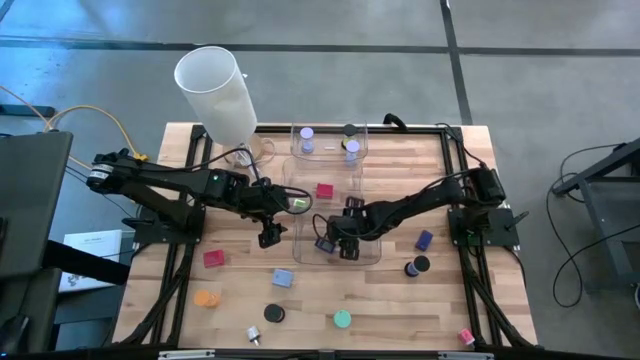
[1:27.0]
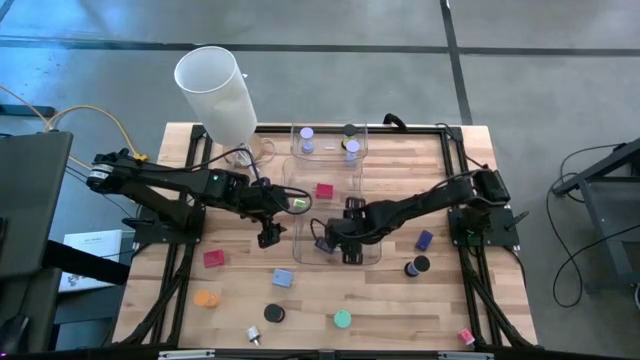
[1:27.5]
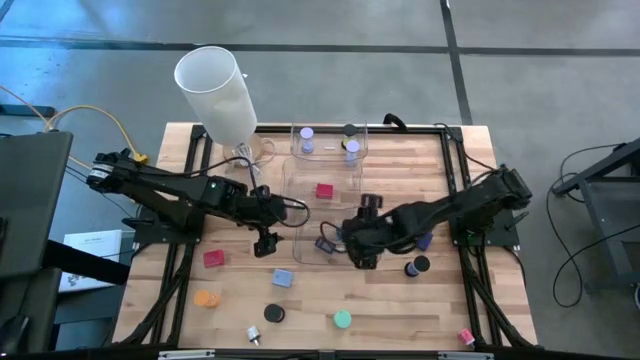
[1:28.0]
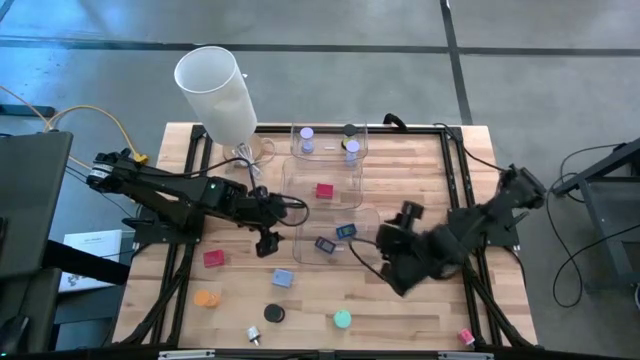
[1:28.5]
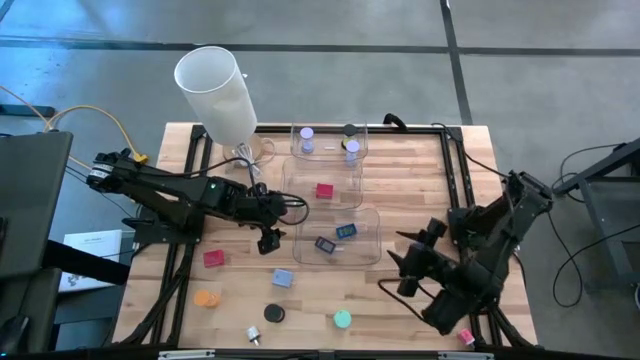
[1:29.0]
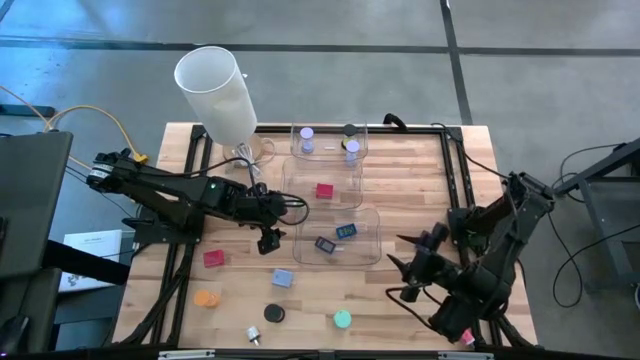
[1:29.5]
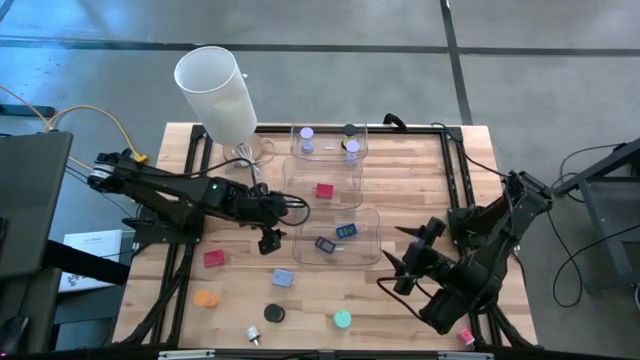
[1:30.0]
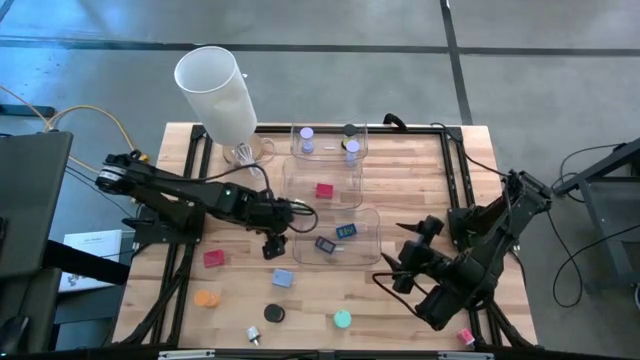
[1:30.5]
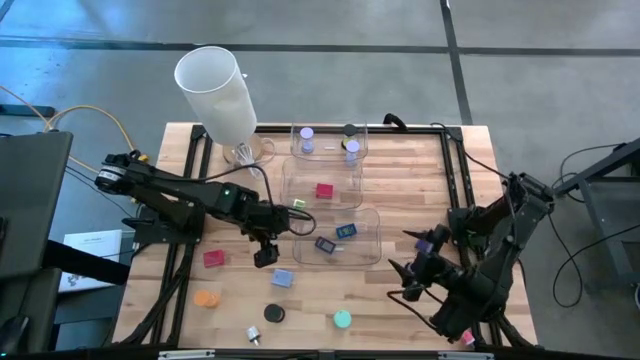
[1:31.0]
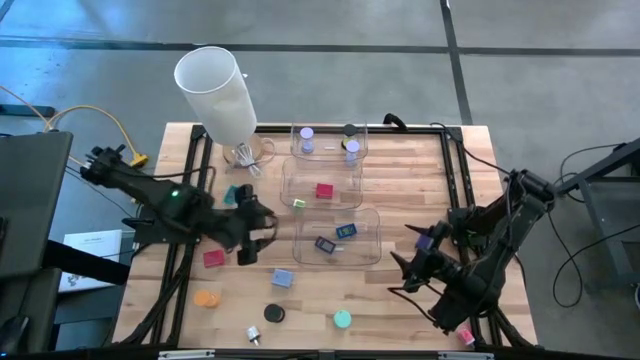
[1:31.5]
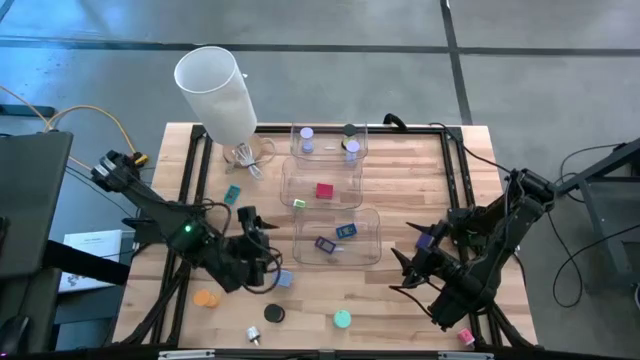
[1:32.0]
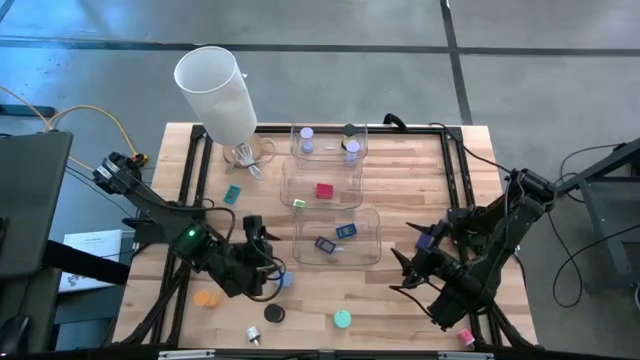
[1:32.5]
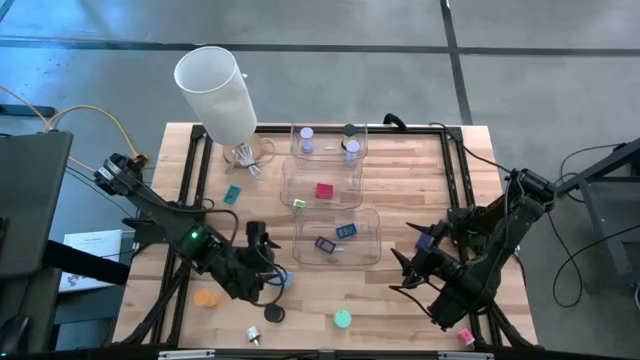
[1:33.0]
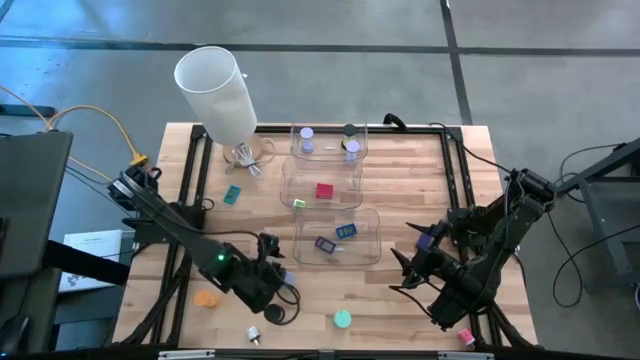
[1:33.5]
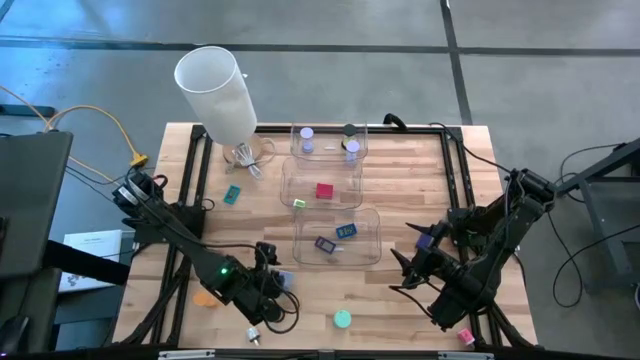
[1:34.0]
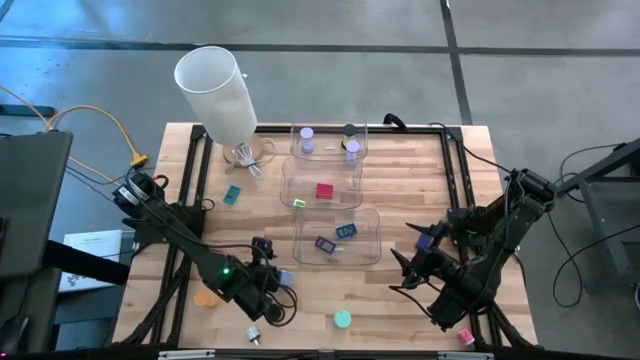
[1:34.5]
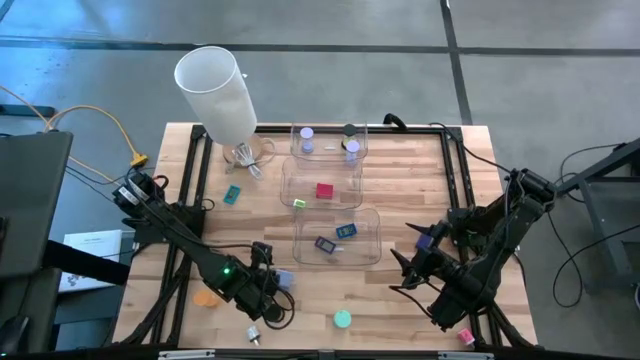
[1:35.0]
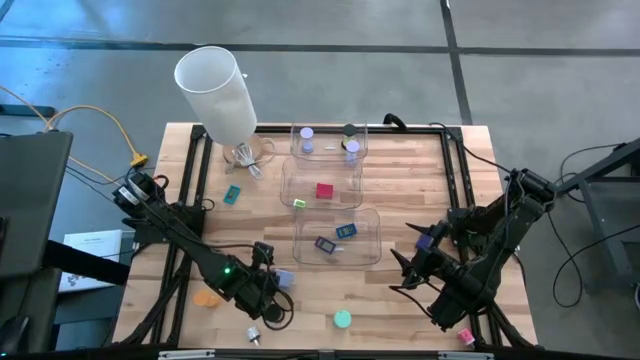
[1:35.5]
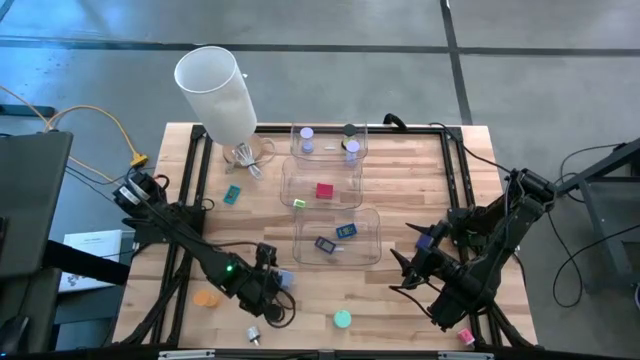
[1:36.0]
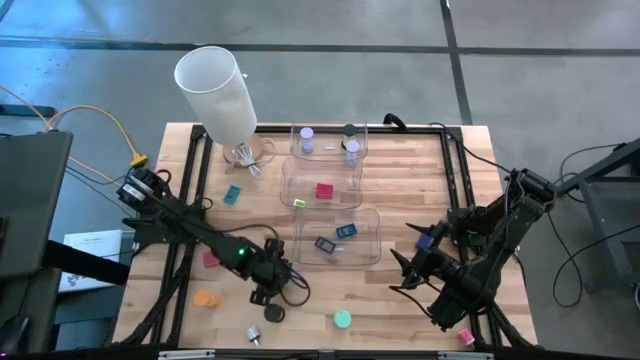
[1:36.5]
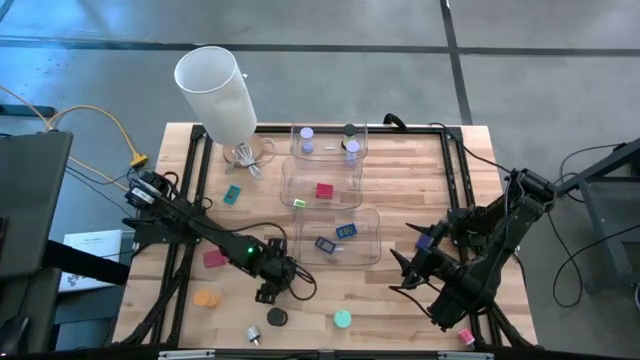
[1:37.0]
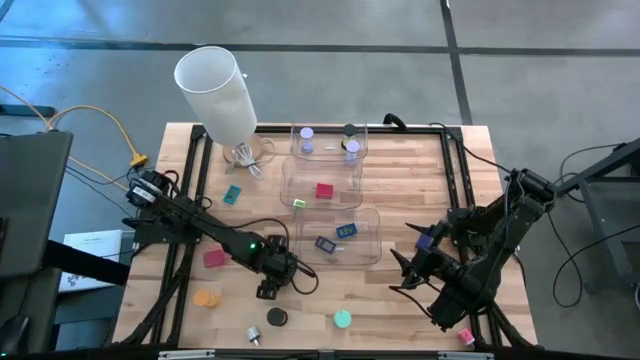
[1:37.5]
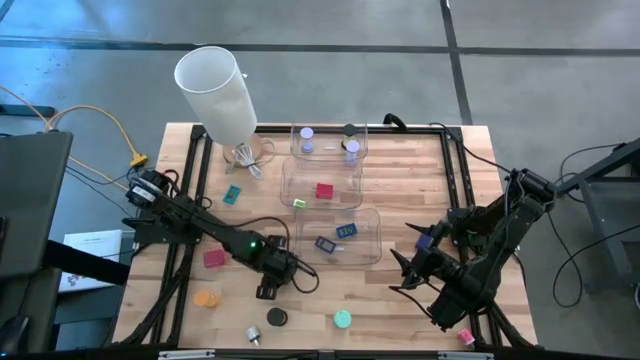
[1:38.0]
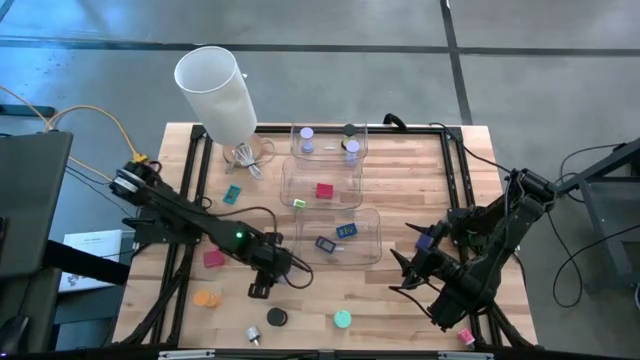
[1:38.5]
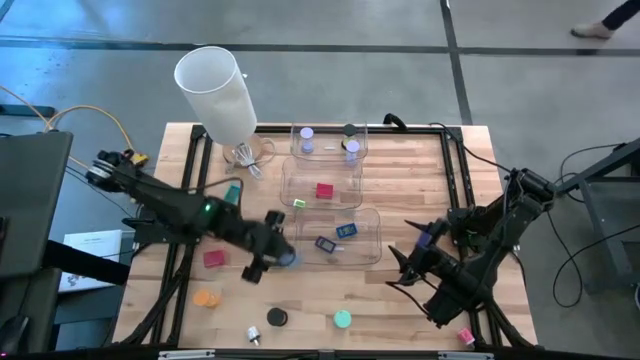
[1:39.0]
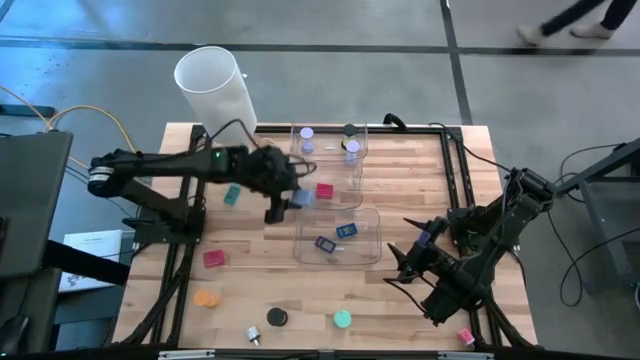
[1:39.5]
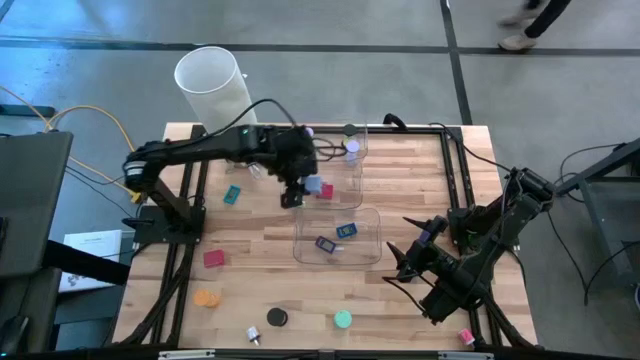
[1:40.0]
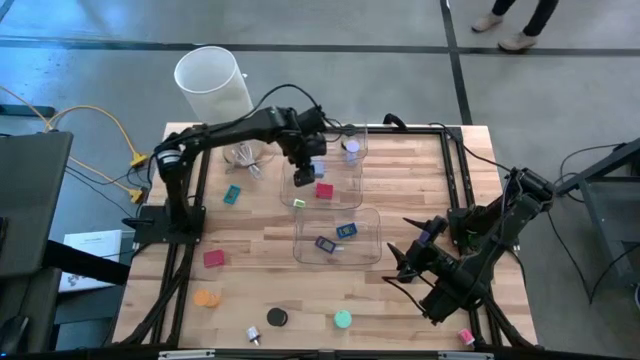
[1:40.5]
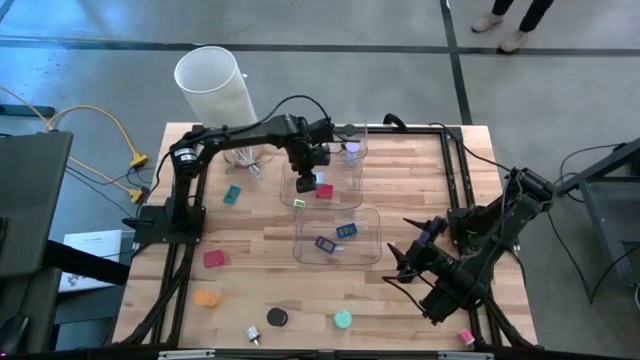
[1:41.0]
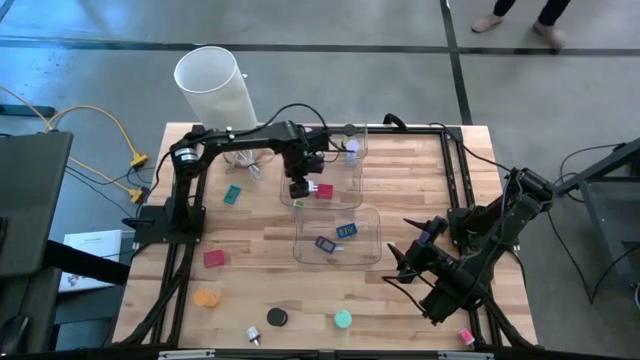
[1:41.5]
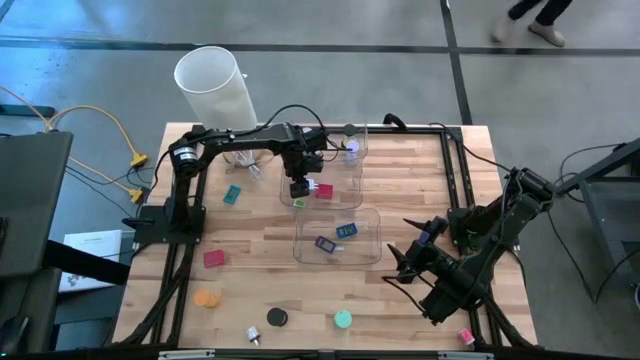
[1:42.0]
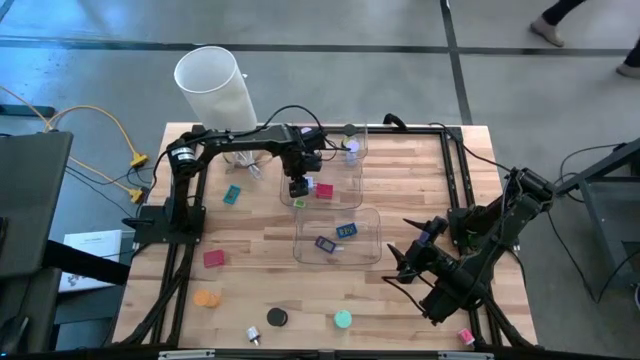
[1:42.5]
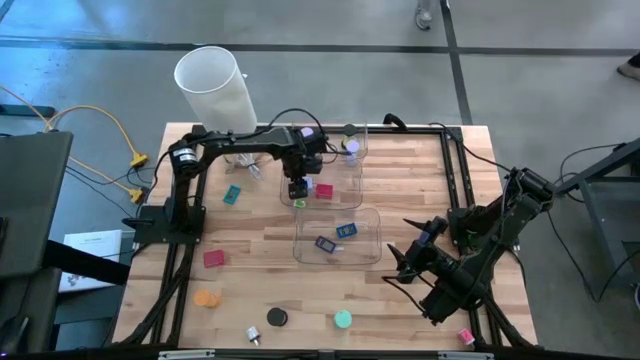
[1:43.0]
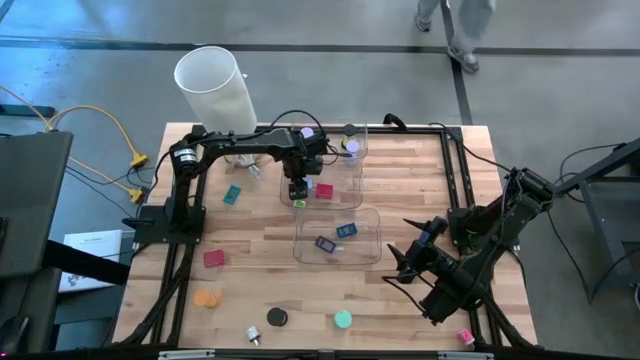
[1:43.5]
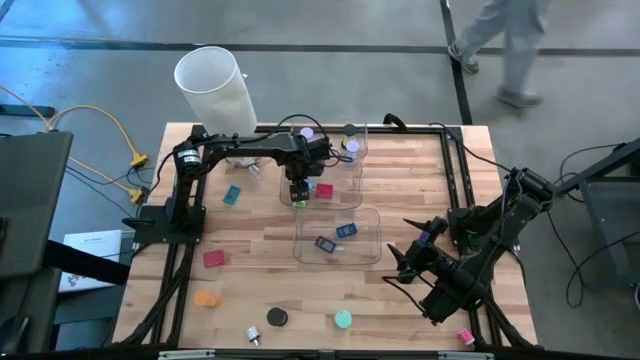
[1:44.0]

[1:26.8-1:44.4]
Task: Pick & Place Office items
Put the blue charger adapter into the middle transparent bin

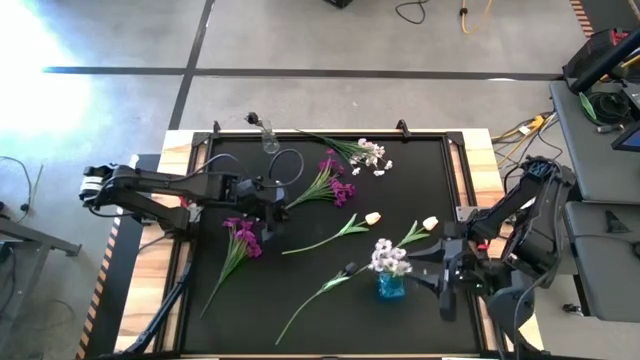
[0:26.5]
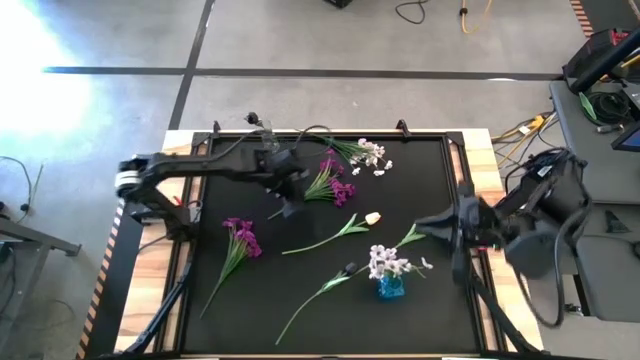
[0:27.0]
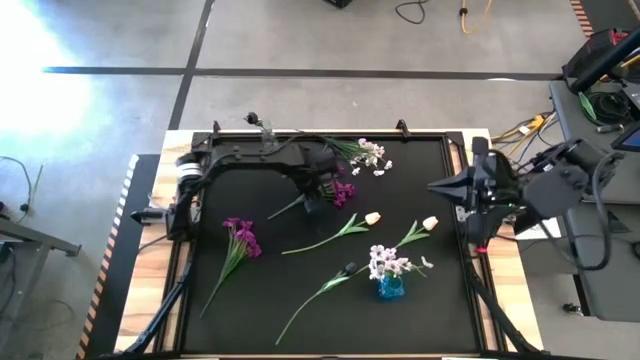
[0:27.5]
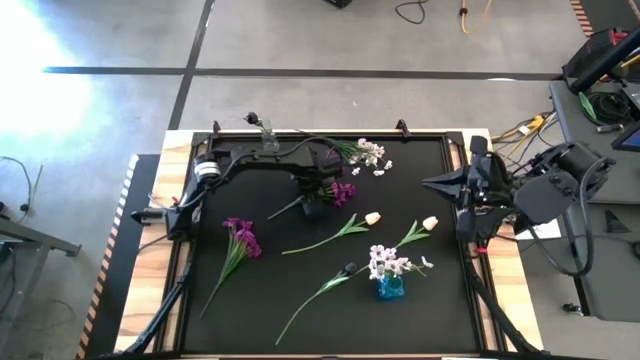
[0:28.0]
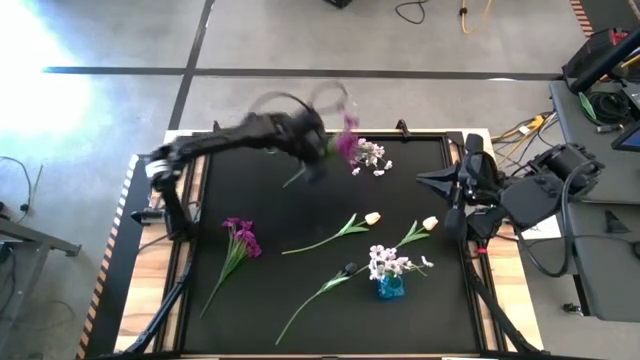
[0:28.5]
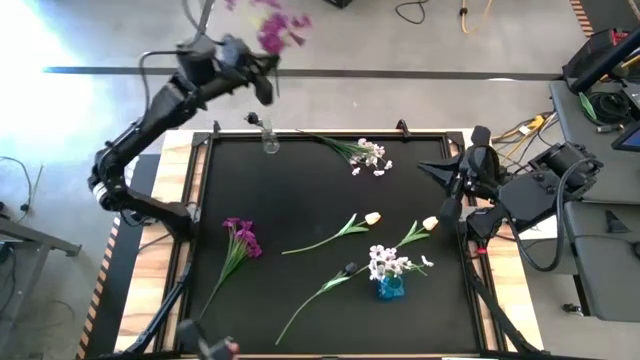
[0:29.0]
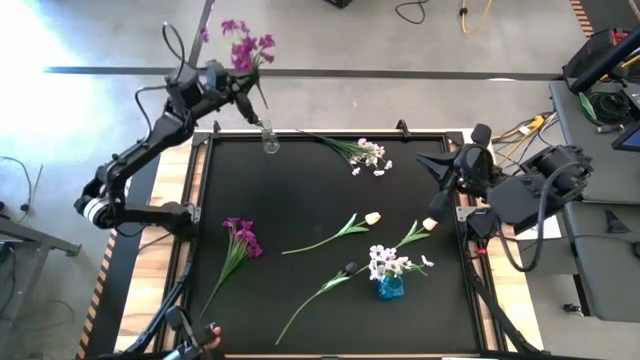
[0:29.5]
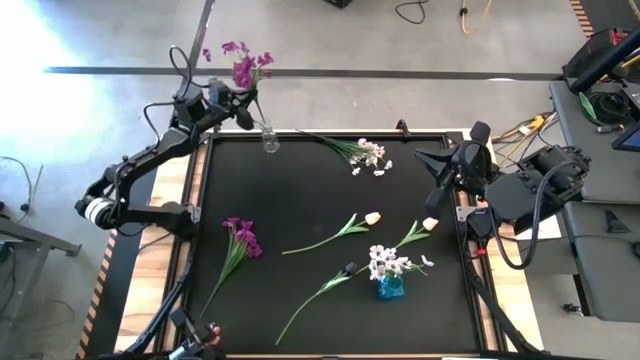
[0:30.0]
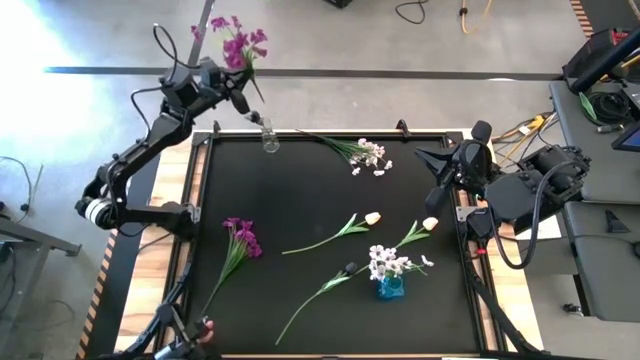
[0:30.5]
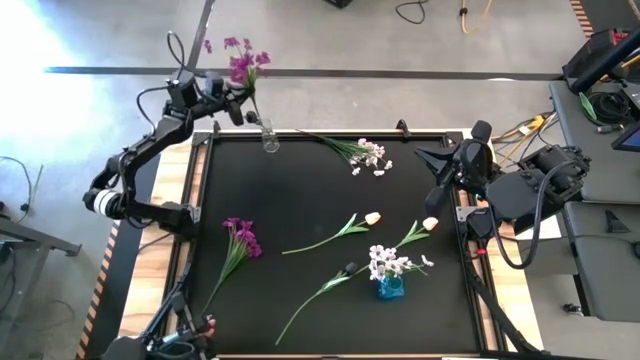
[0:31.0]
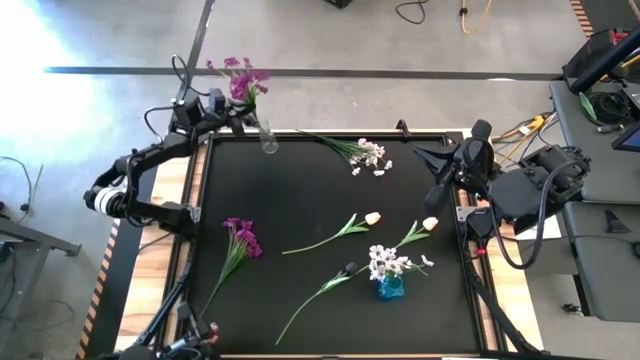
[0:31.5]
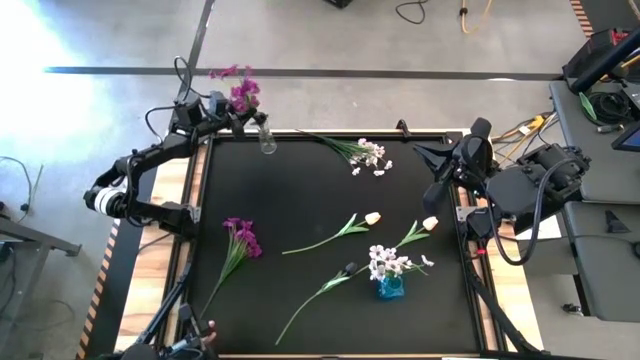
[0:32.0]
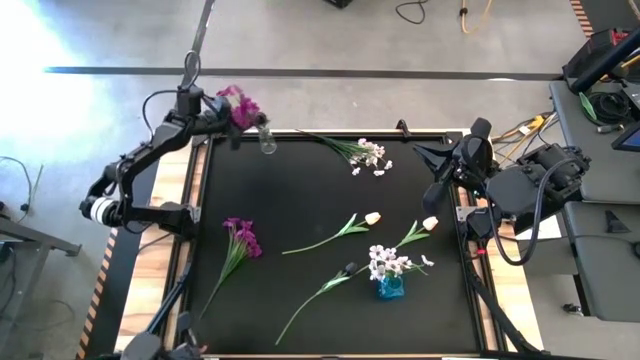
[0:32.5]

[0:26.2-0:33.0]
Task: Sort flowers into vase by color
Put the top violet flowers into the transparent vase
